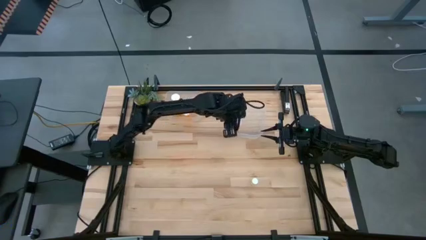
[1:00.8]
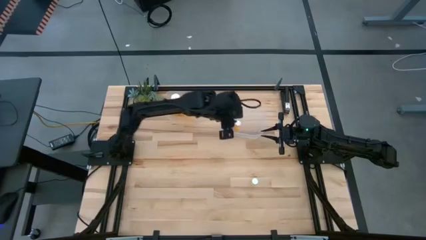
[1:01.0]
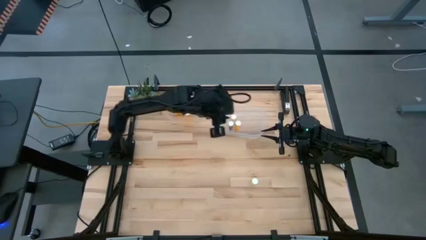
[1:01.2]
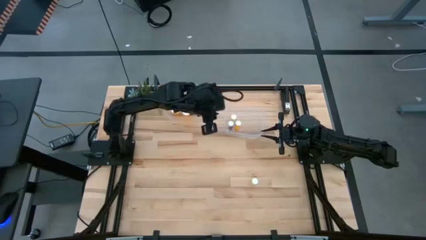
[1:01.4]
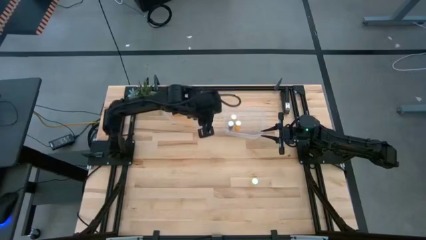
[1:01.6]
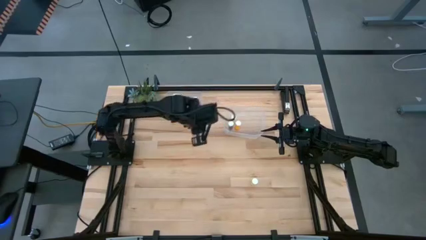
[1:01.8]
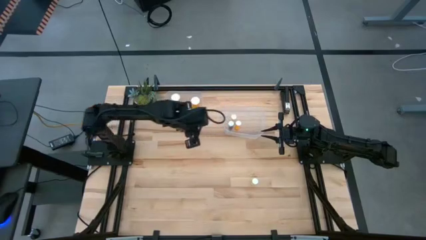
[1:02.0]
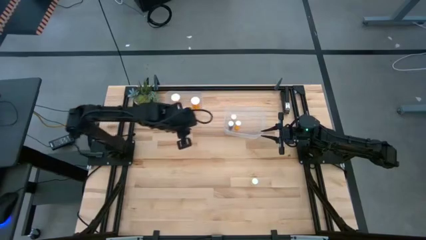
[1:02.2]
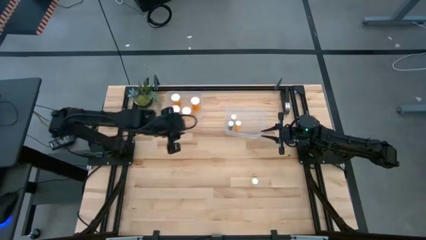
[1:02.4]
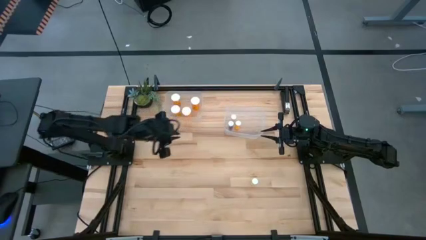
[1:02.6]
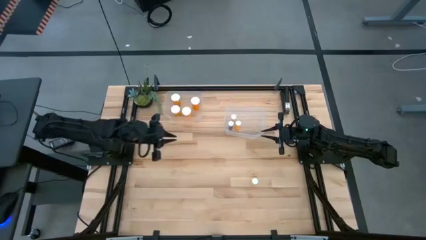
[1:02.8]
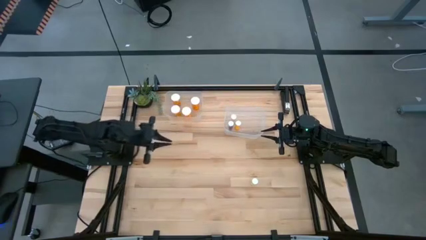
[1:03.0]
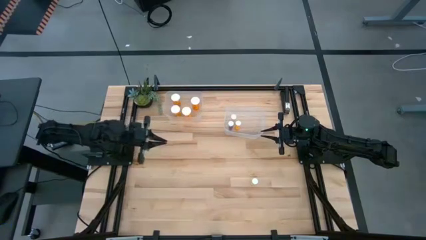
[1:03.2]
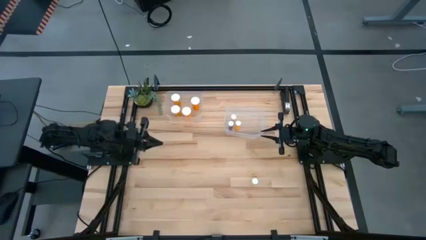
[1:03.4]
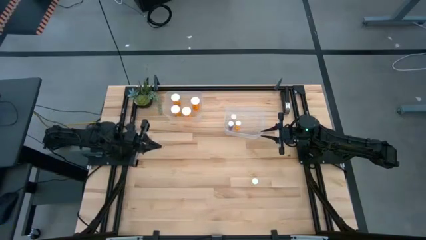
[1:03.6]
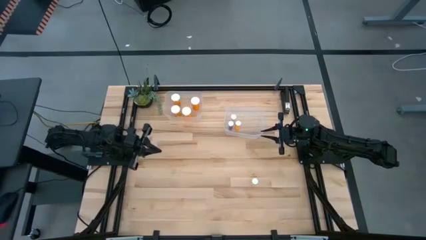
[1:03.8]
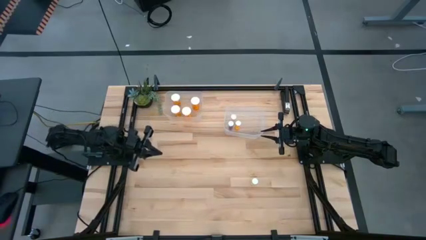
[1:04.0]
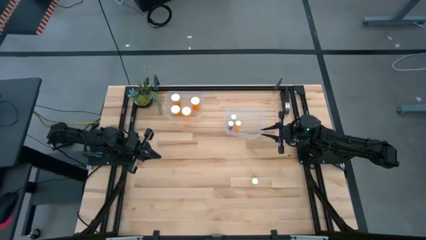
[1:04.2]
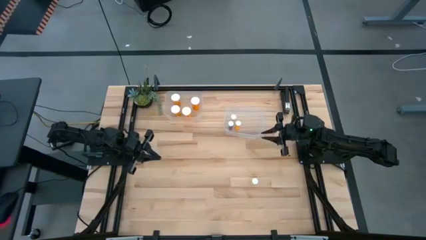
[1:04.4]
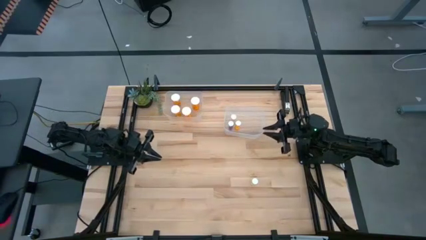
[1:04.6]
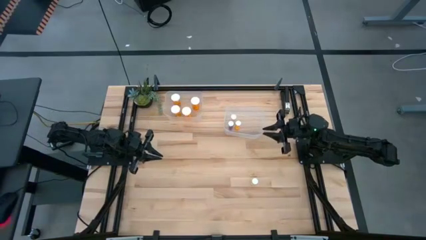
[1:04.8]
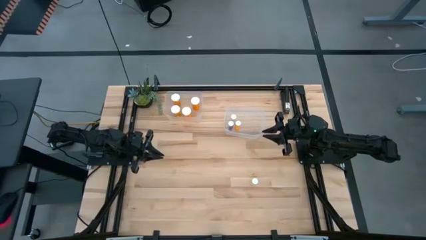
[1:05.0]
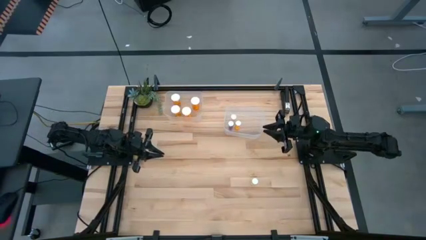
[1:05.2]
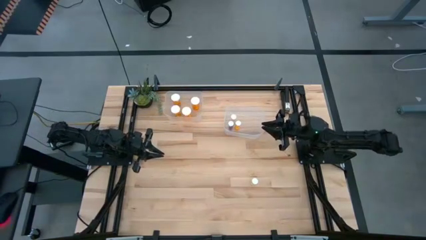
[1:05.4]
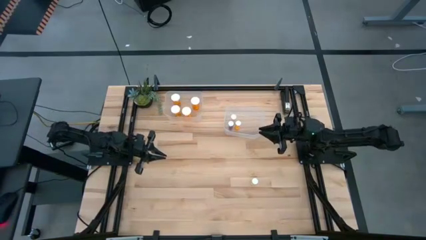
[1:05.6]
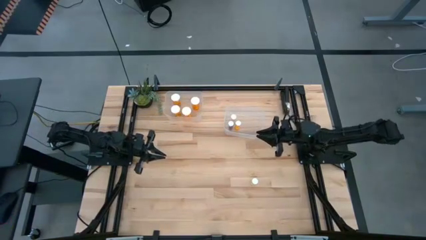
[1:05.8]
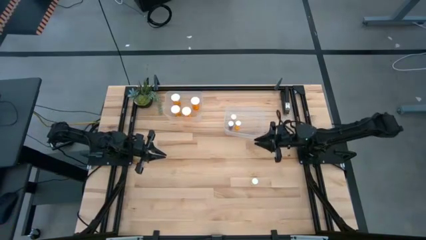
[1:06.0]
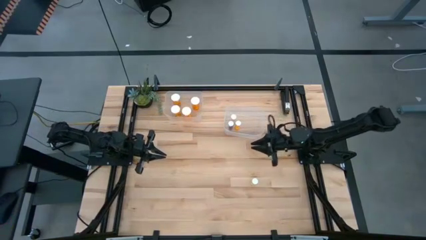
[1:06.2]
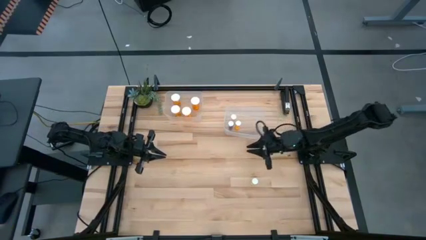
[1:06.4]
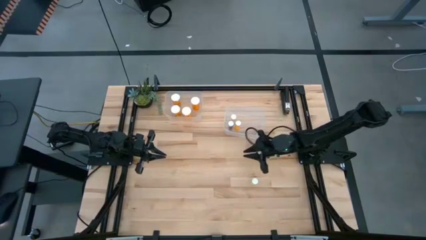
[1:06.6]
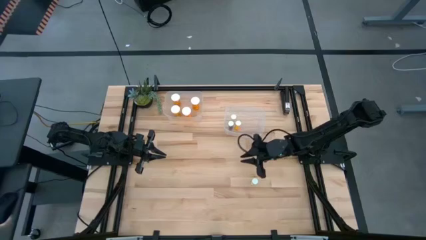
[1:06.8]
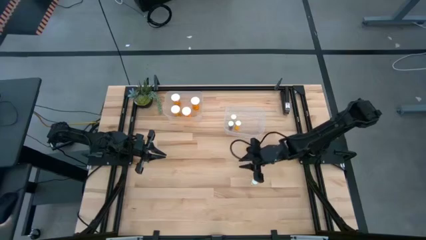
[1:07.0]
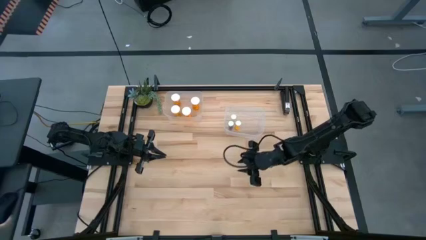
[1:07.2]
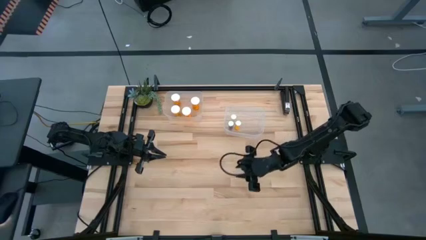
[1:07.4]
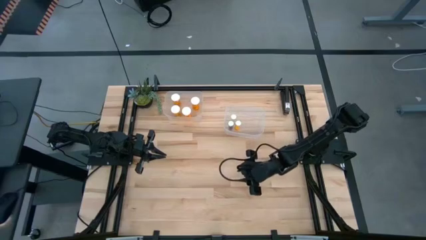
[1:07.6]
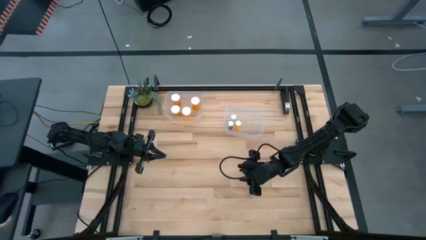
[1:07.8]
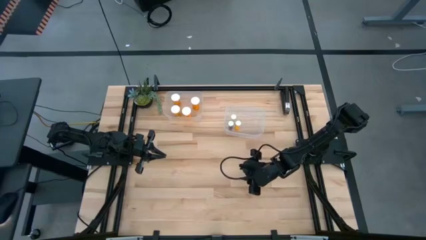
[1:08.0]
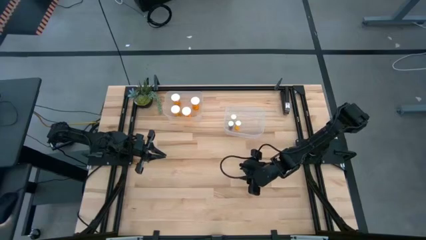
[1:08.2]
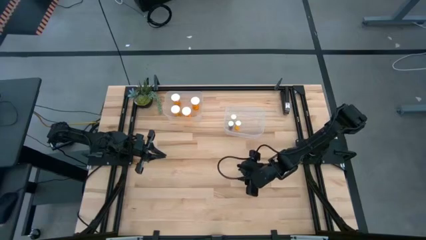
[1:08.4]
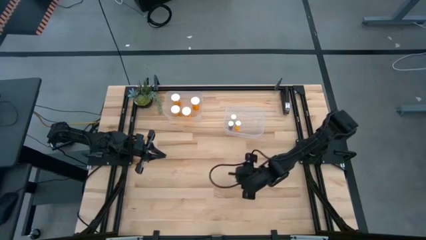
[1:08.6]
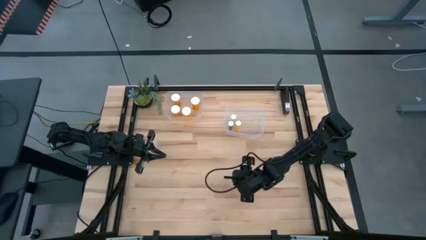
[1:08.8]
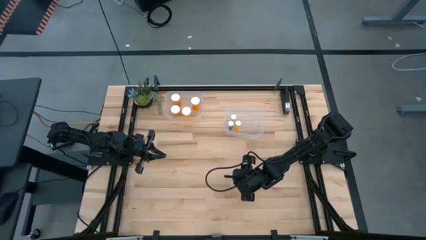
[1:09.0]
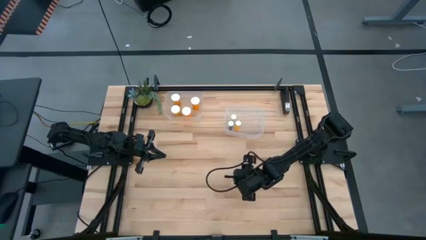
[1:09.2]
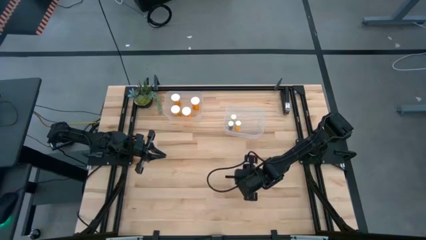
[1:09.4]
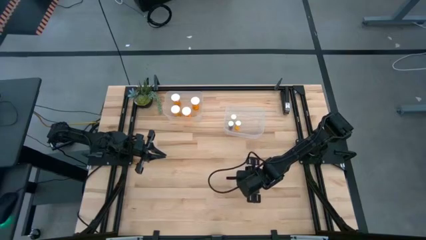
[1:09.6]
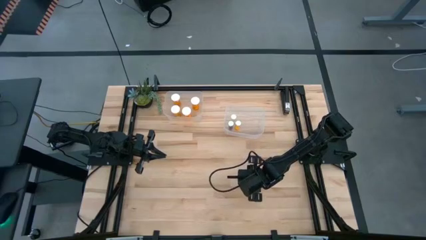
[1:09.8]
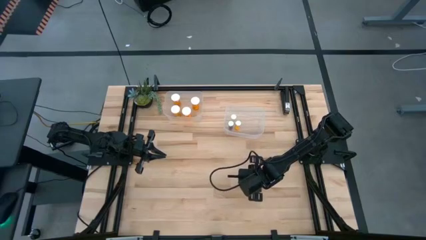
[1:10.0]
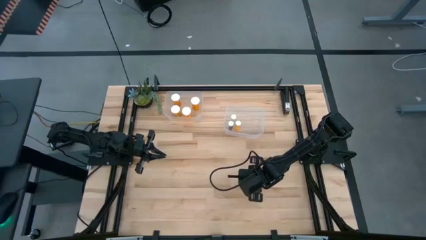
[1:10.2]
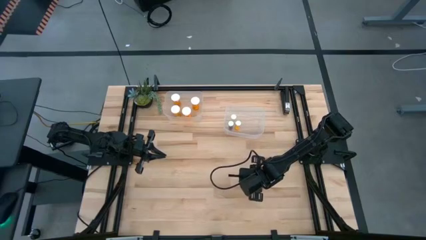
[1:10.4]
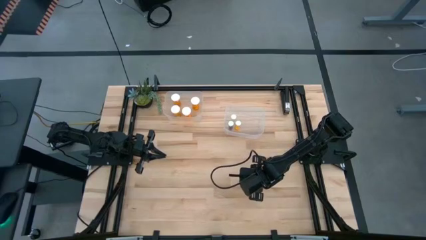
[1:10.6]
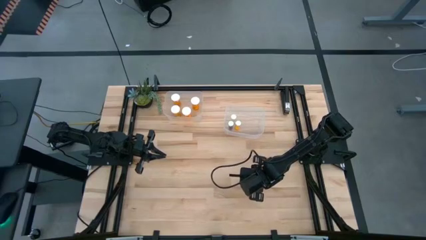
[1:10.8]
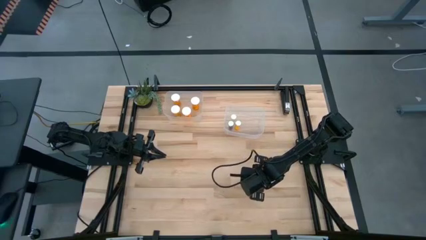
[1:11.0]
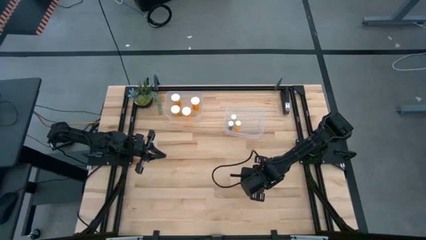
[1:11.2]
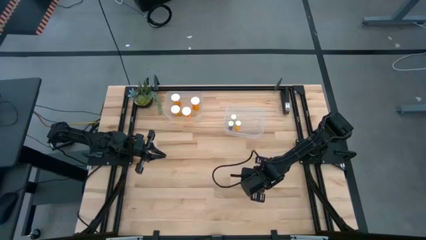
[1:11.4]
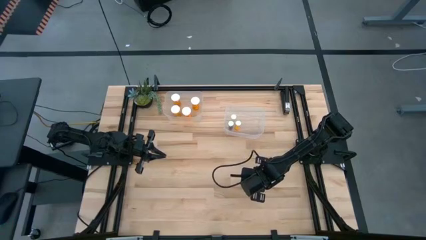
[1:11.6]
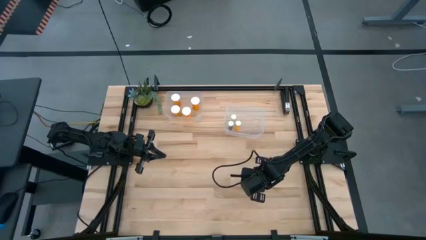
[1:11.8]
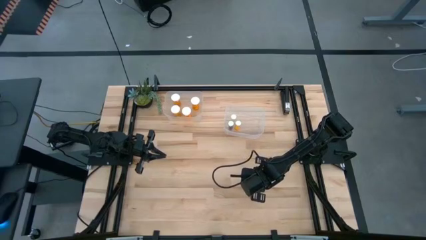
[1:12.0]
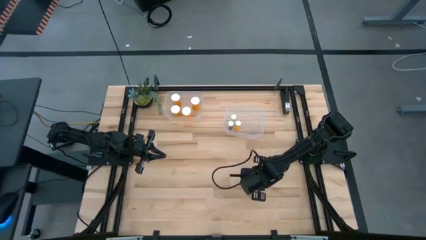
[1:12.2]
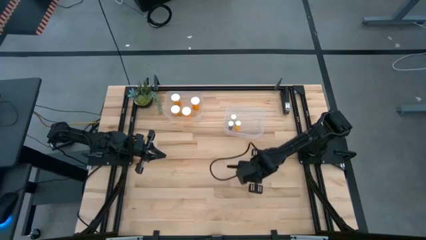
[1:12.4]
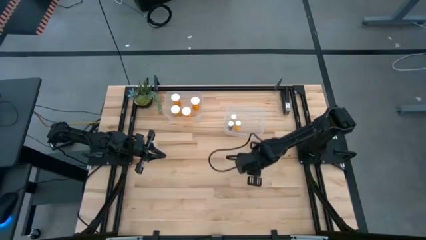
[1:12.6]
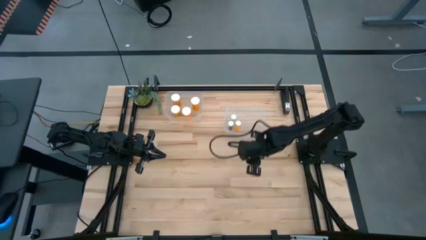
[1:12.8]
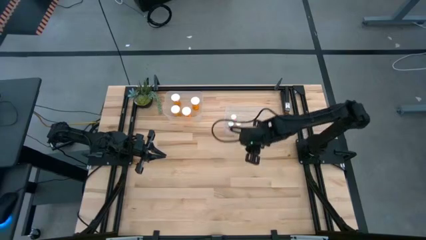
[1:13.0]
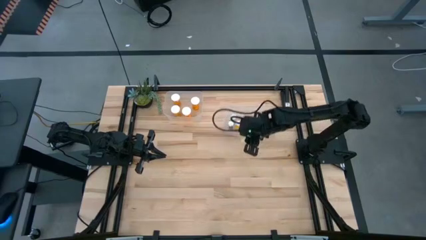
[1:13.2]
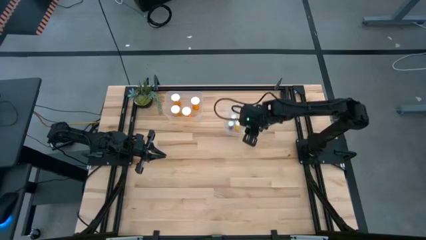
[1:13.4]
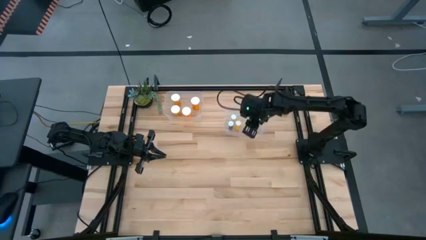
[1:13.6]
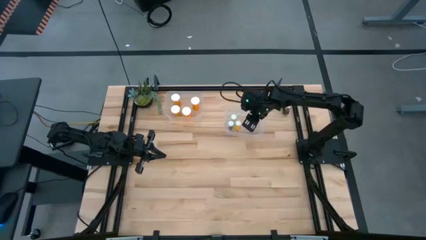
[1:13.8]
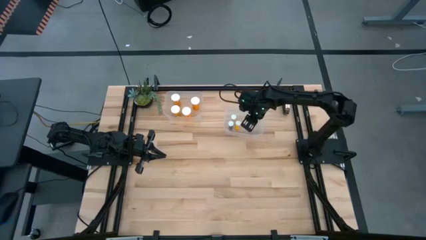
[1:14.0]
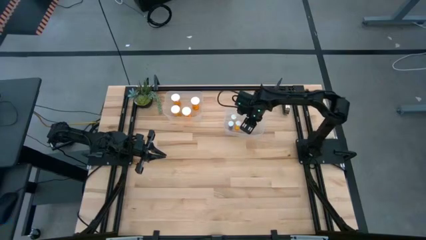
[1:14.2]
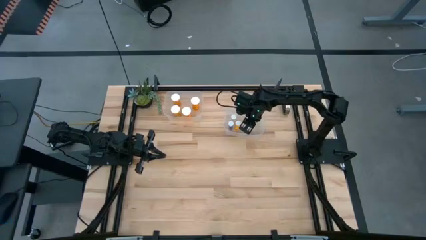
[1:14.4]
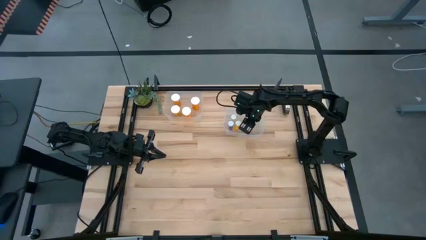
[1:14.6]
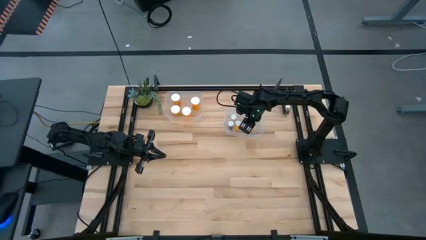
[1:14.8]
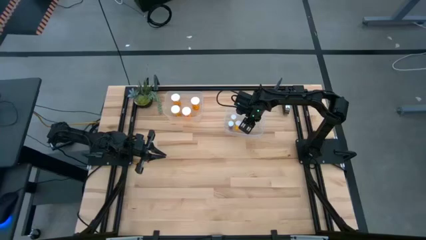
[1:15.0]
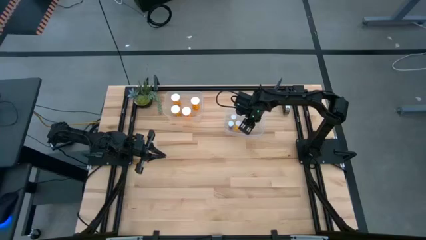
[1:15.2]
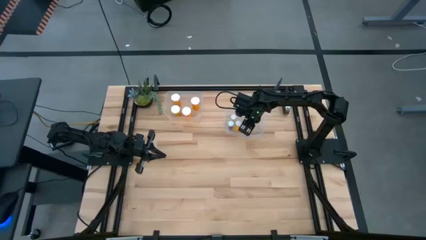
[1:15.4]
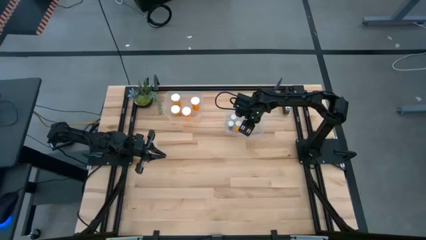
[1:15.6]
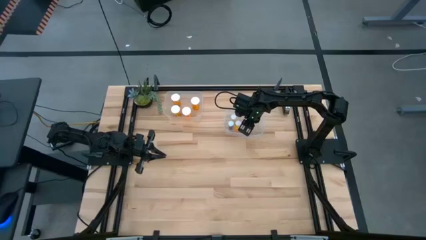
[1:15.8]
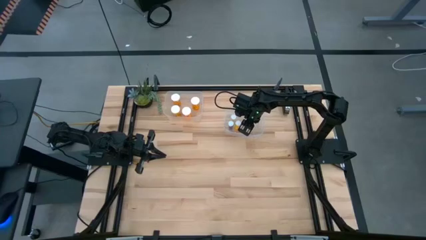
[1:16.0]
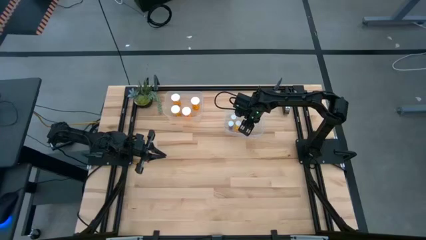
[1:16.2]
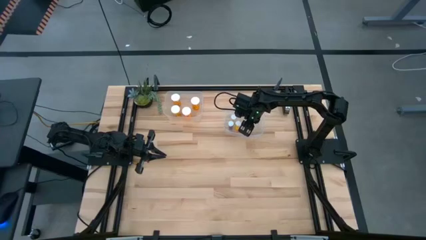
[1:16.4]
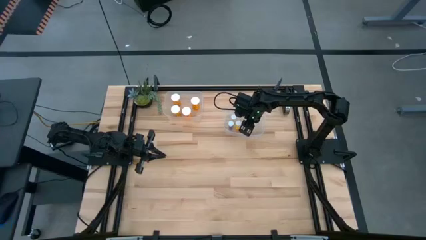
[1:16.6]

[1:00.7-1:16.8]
Task: Pick and place medicine bottles into bin by pill shape (circle, oval)
Put the small yellow pill bottle into the right transparent bin
